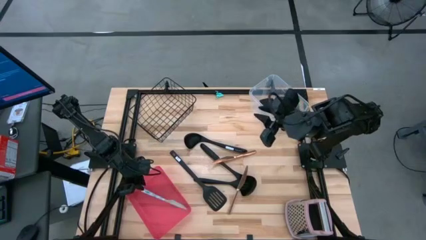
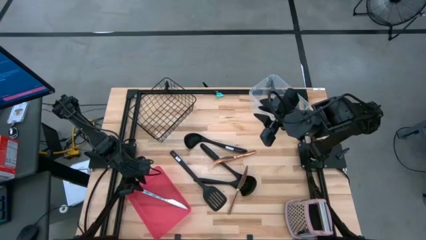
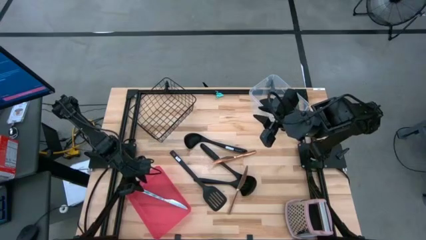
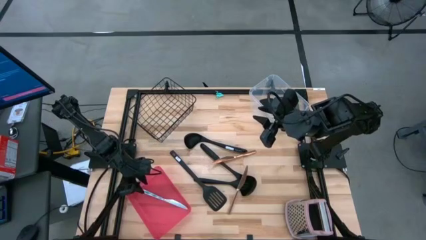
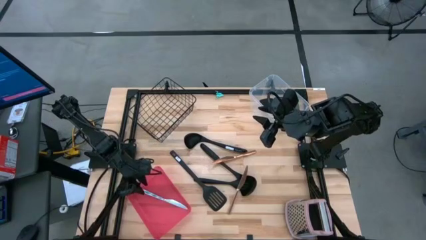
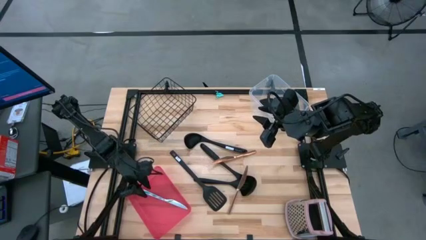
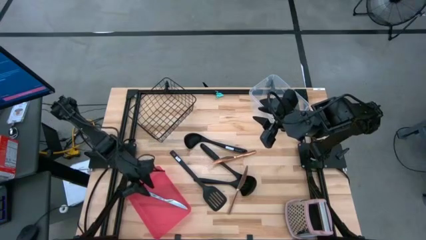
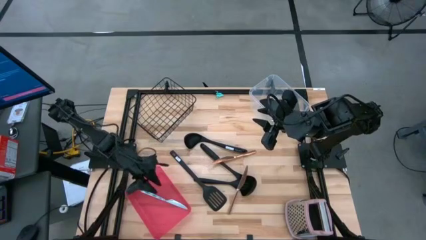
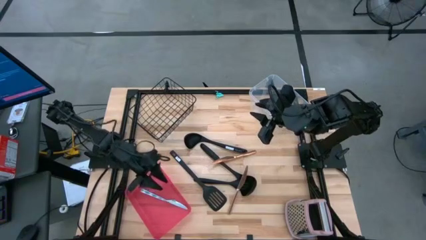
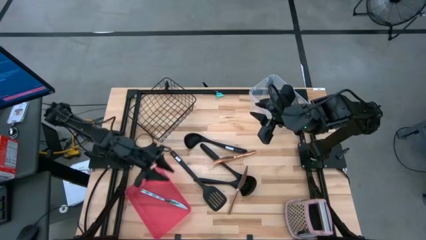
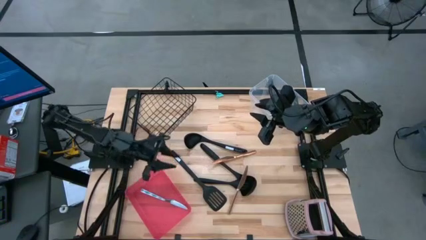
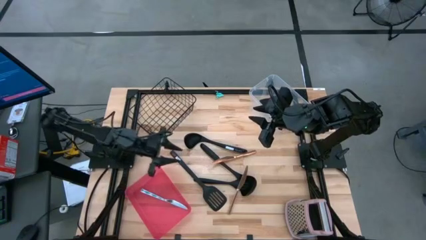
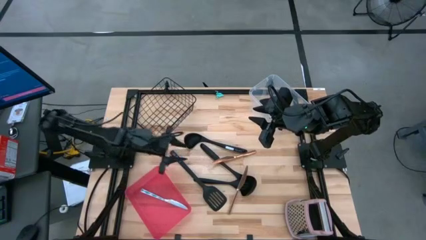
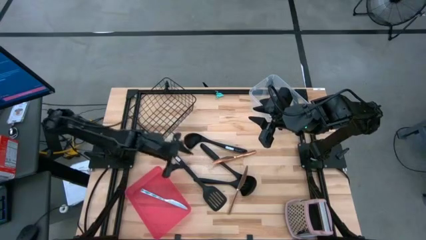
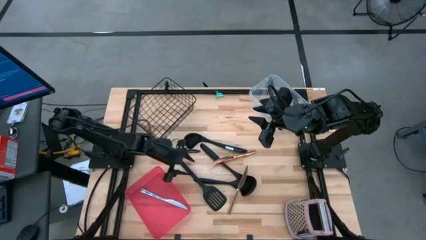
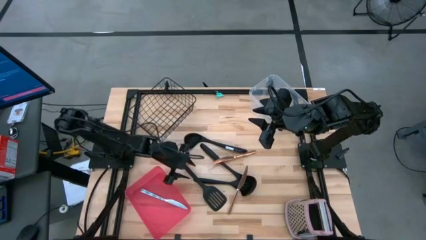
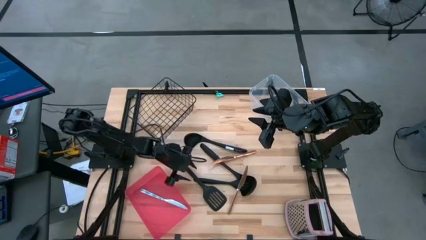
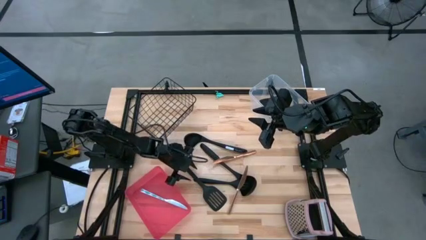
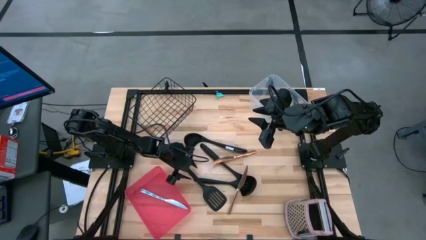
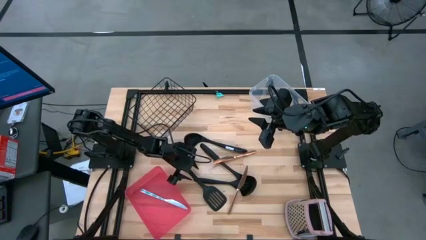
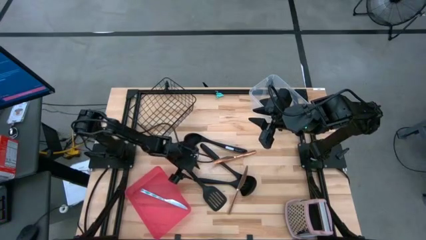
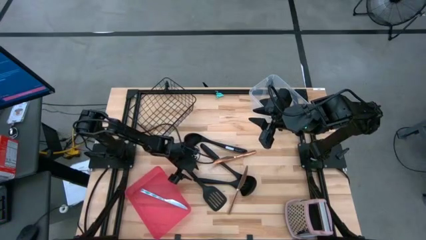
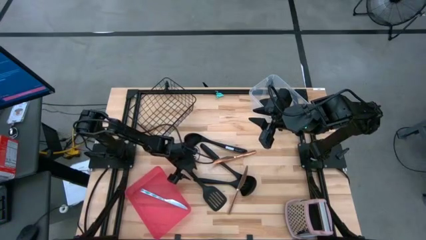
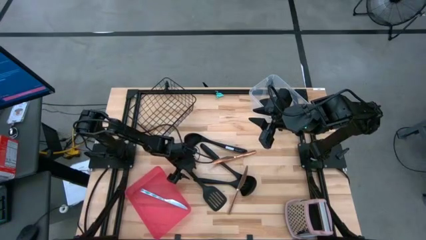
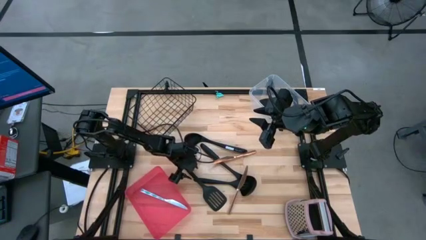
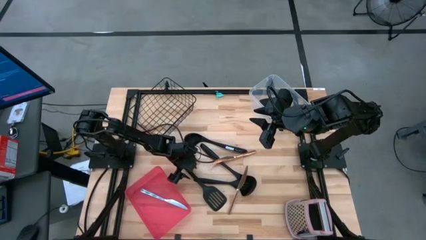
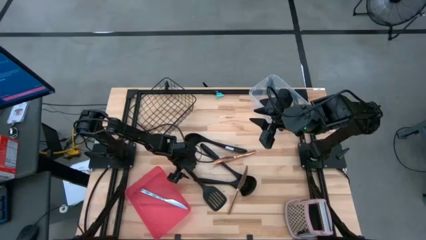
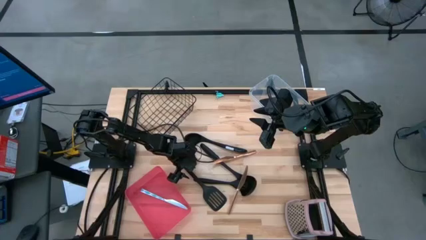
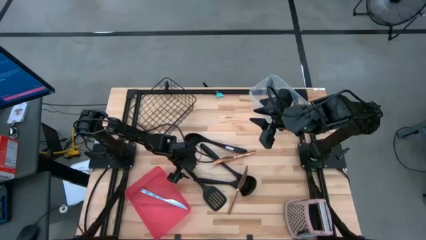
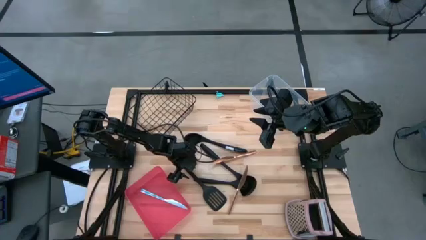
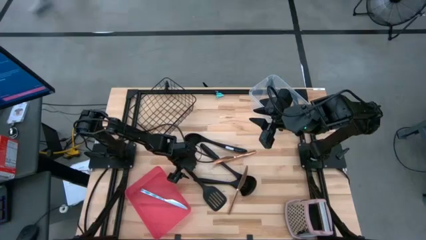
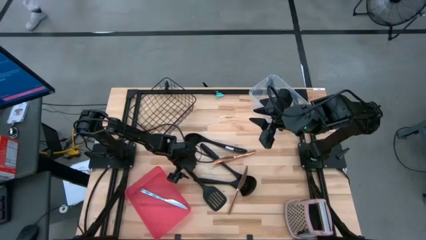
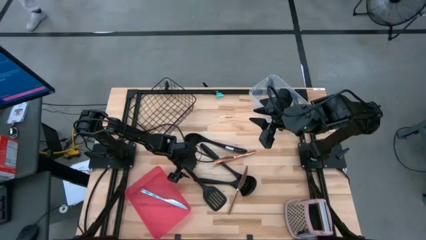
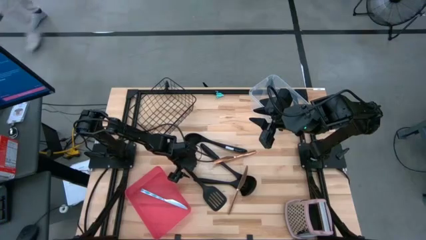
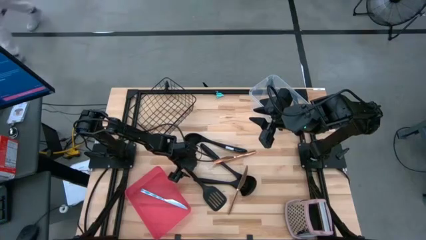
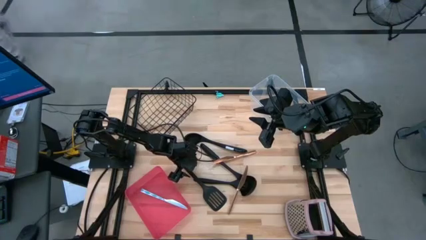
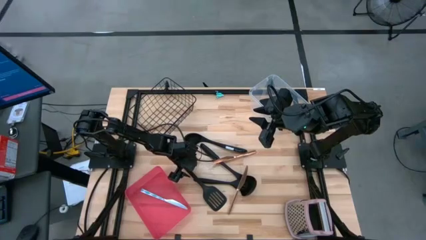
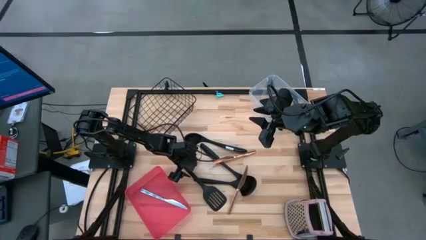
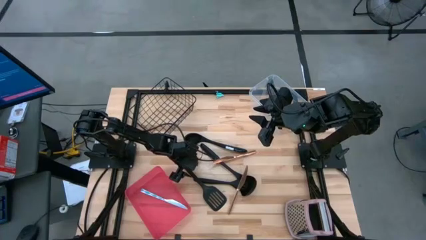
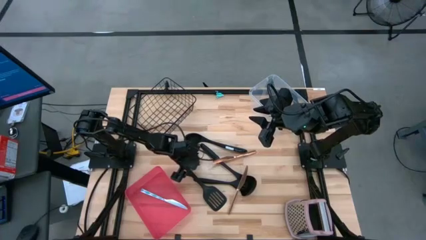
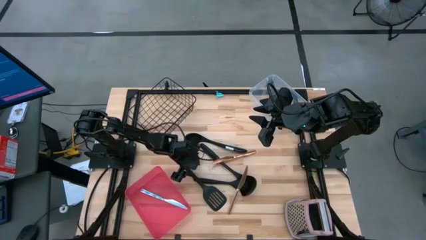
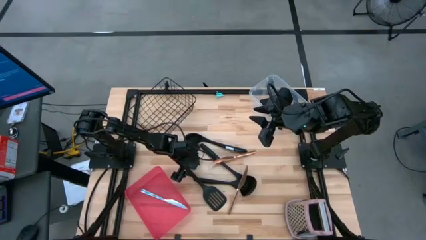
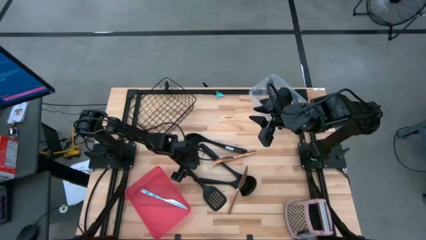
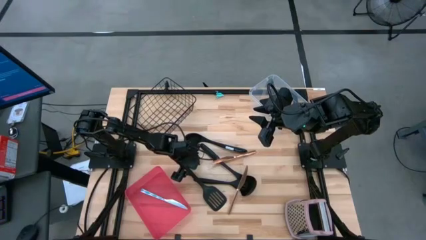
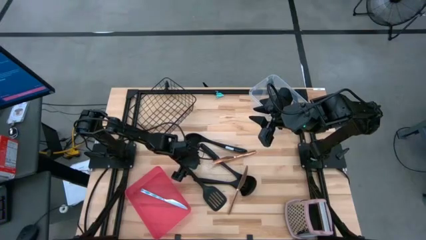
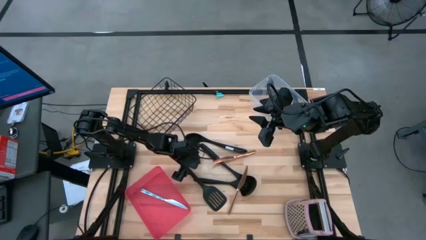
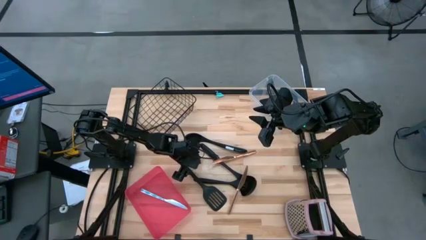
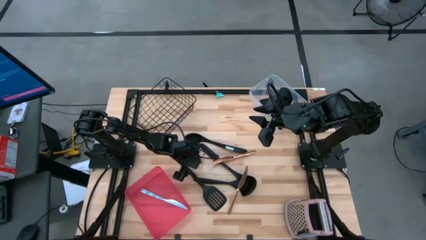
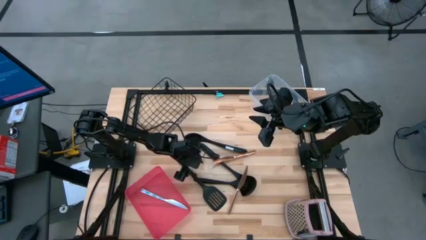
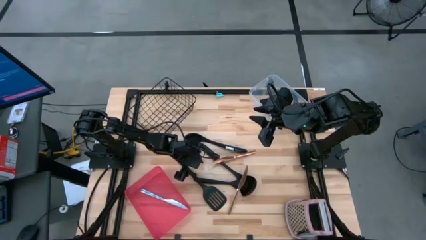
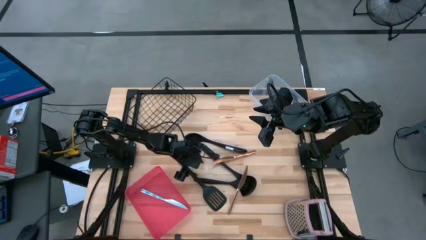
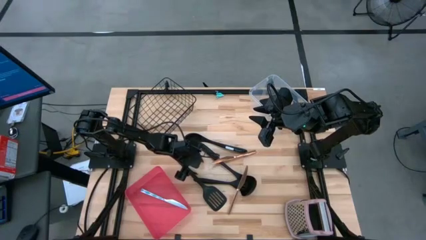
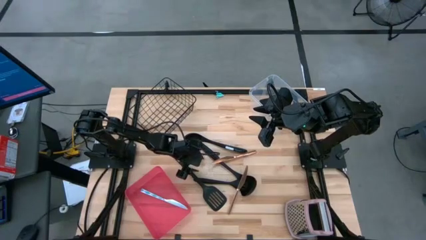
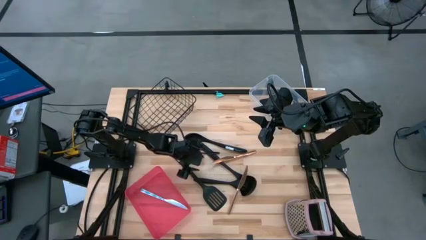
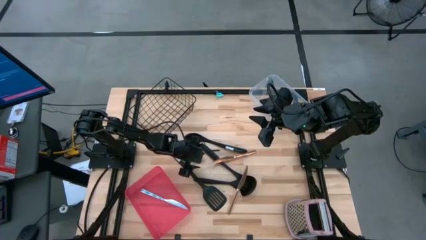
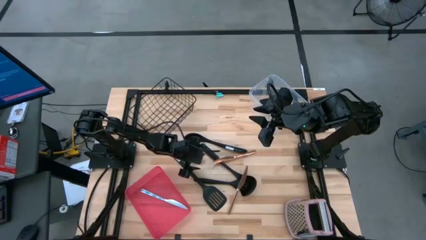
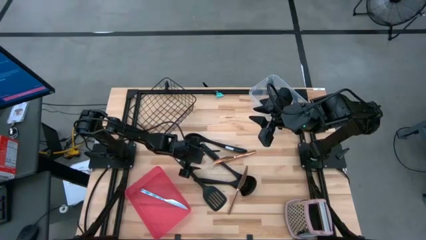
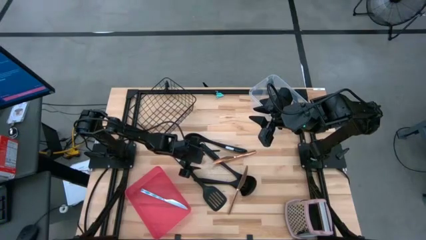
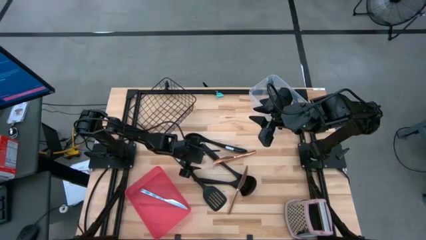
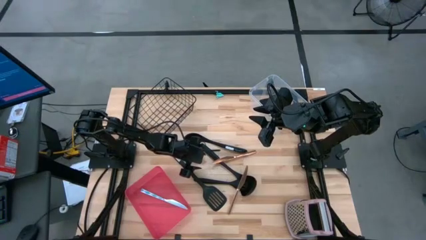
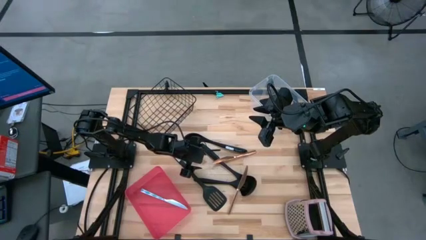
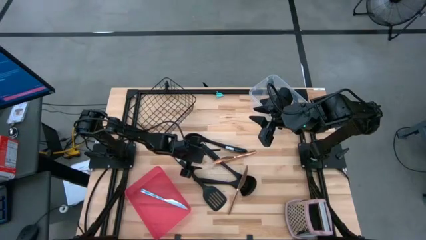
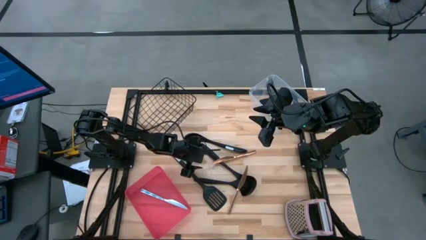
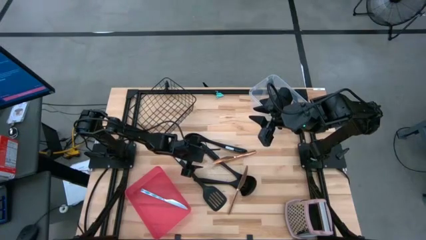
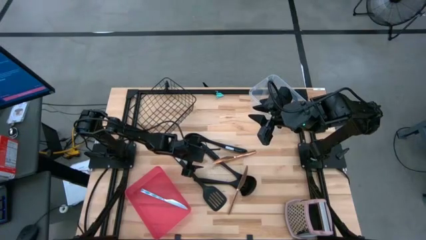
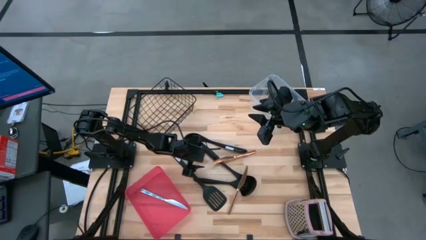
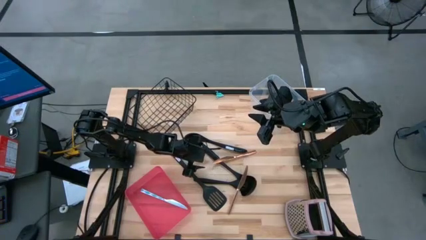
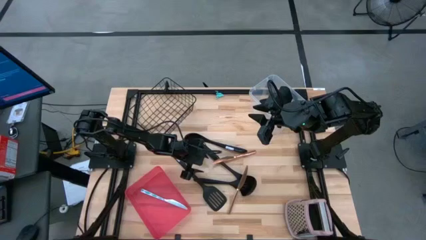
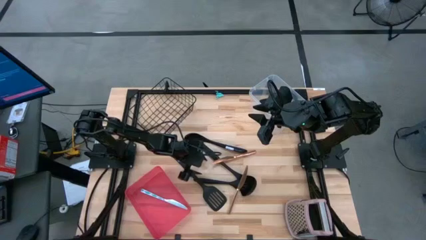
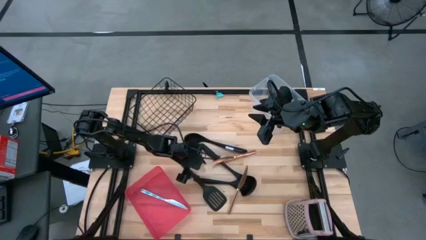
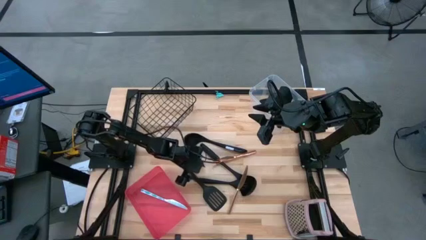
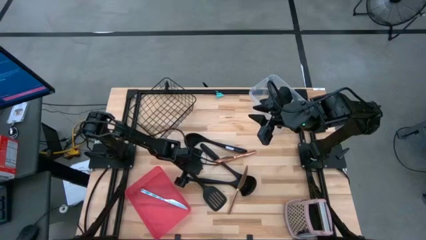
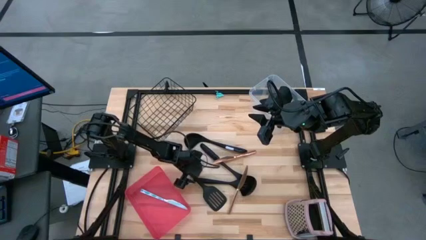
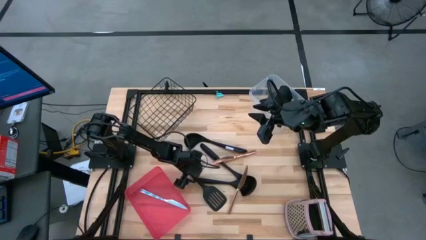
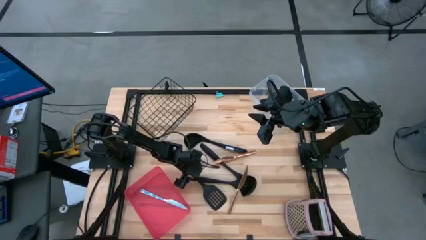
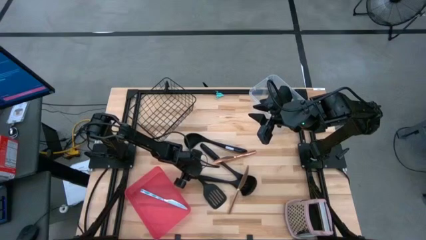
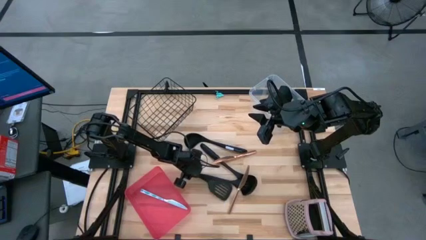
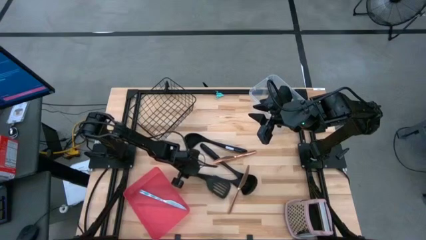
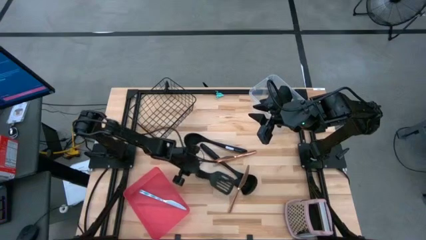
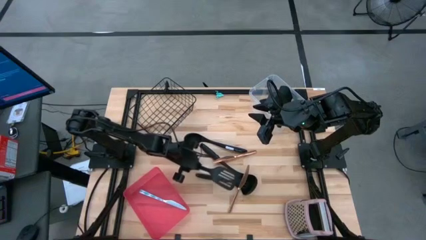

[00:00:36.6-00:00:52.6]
Task: Pick & Place Kitchen Items
Put the slotted spatula into the transparent bin

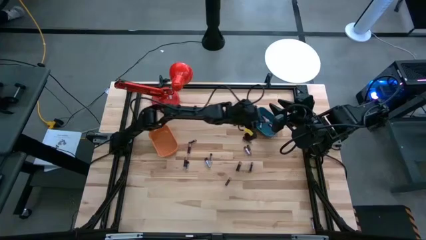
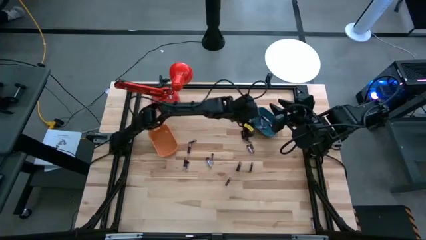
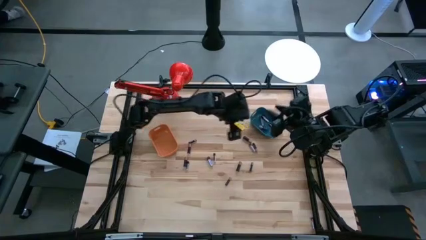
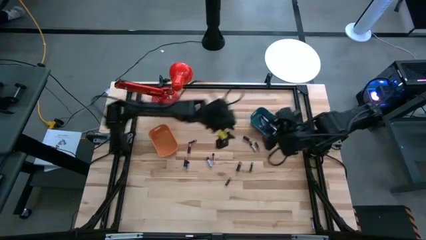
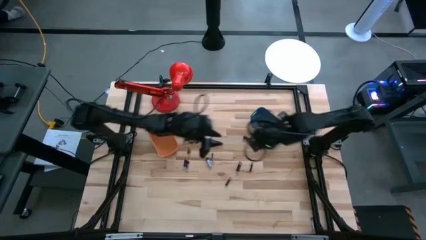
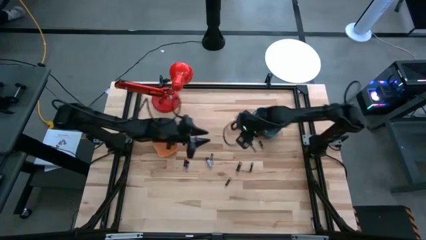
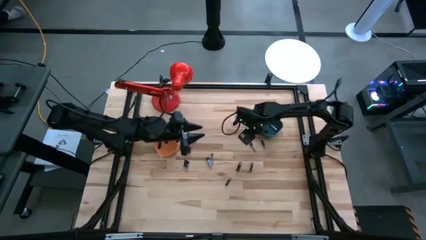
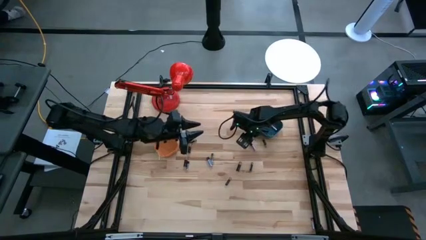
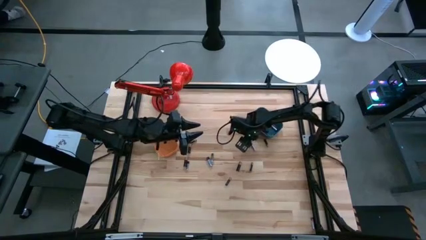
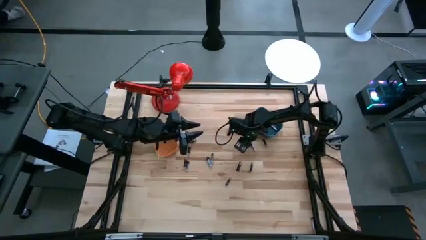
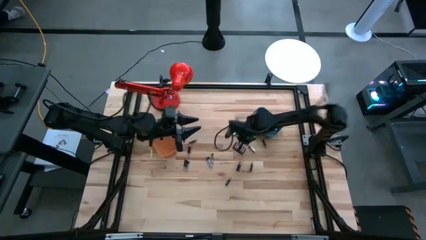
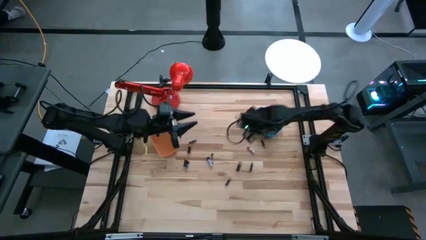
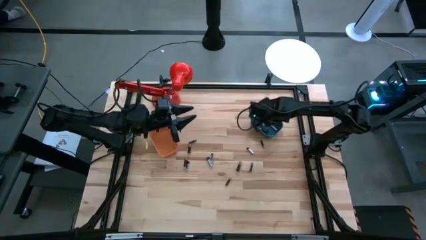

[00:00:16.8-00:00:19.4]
Task: Sort batteries
Put the black battery into the blue bin
